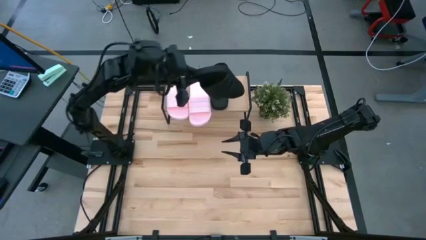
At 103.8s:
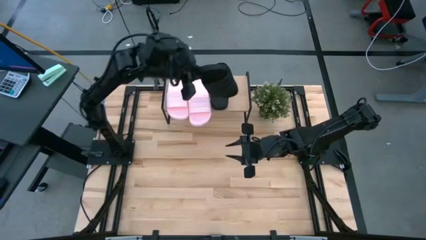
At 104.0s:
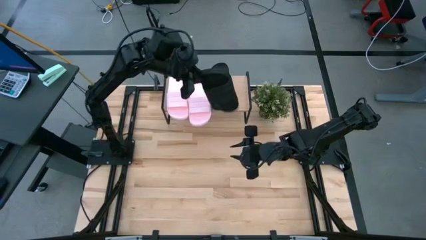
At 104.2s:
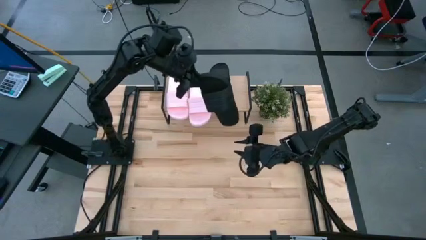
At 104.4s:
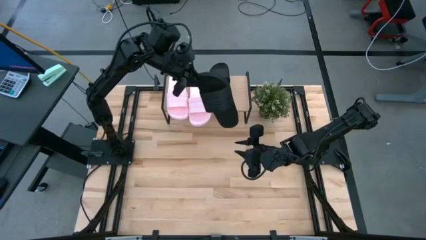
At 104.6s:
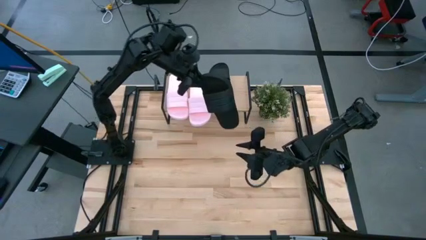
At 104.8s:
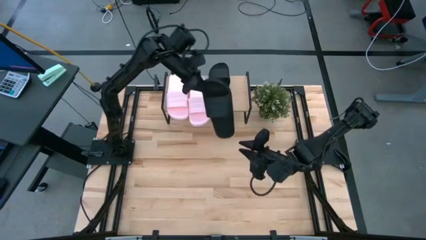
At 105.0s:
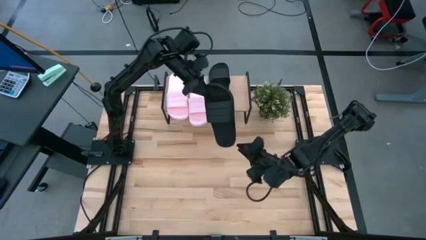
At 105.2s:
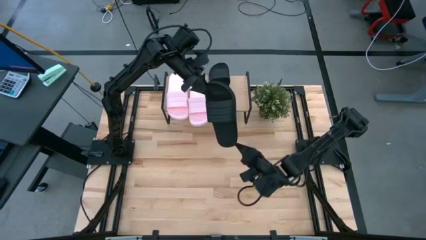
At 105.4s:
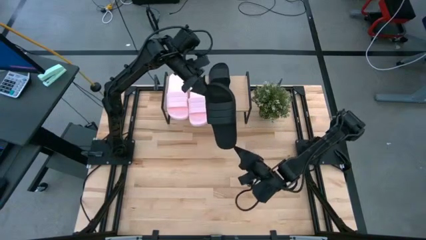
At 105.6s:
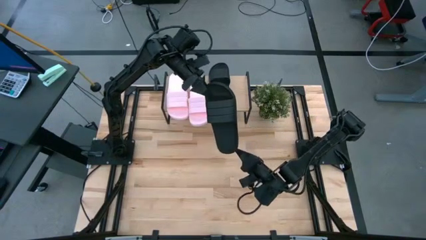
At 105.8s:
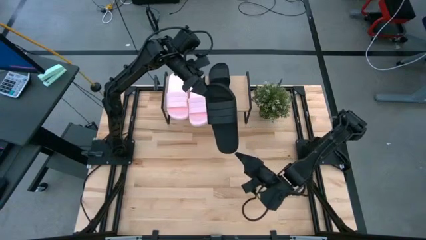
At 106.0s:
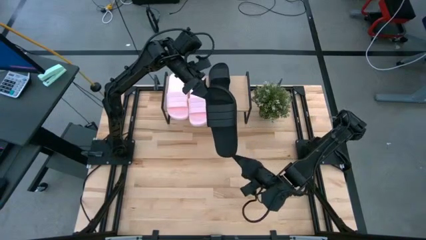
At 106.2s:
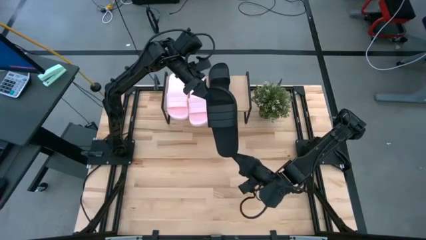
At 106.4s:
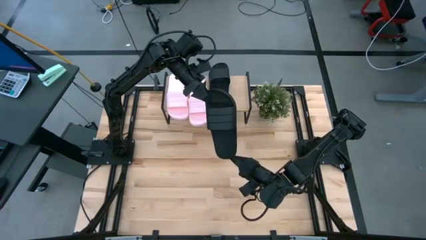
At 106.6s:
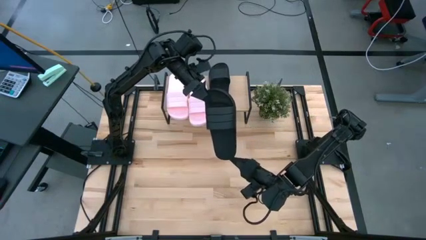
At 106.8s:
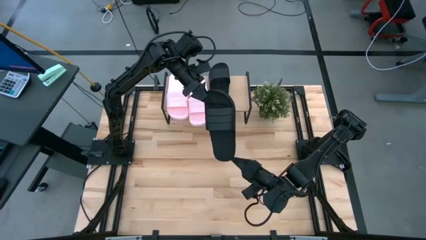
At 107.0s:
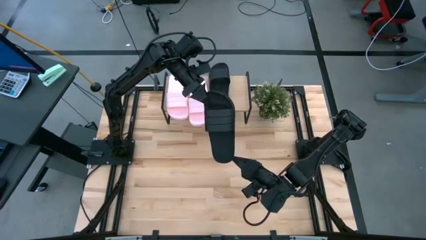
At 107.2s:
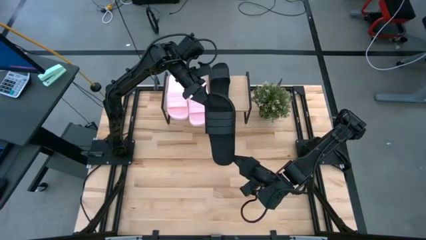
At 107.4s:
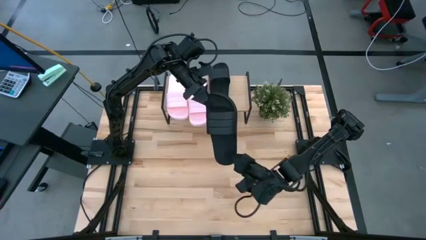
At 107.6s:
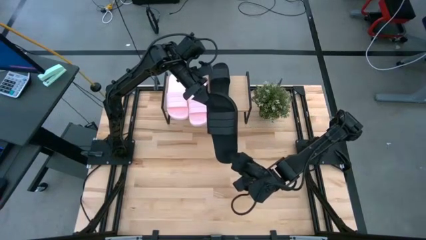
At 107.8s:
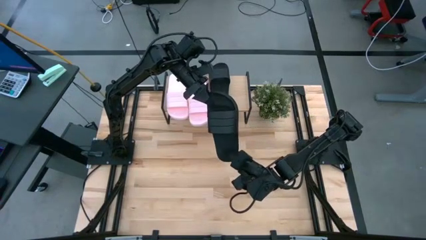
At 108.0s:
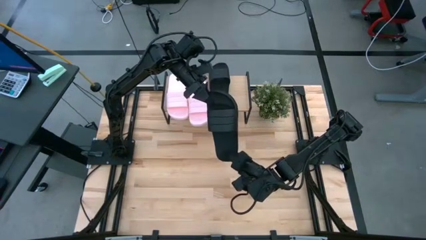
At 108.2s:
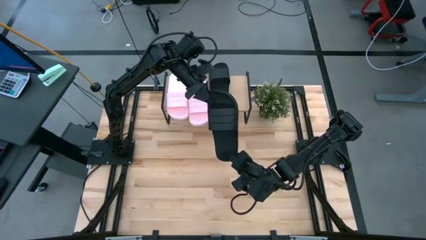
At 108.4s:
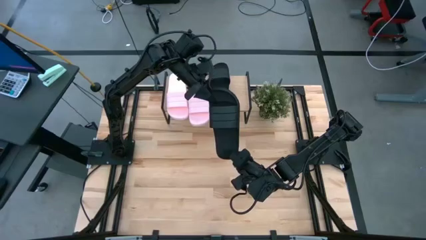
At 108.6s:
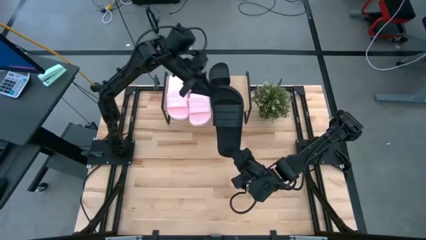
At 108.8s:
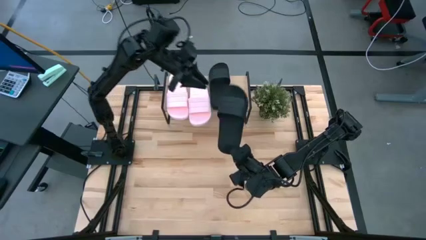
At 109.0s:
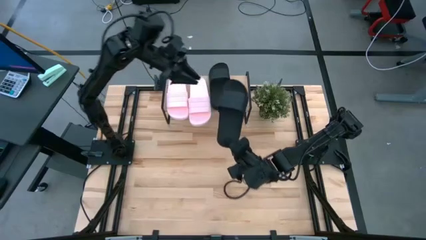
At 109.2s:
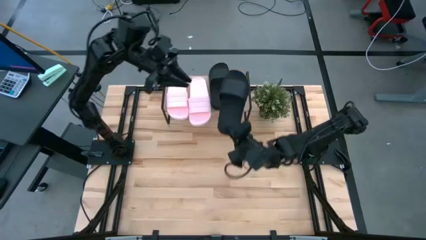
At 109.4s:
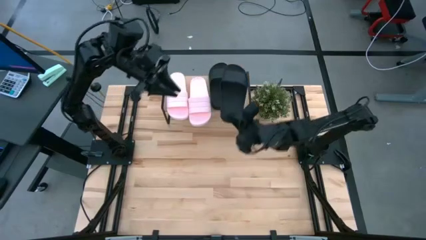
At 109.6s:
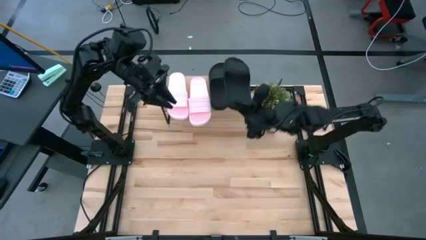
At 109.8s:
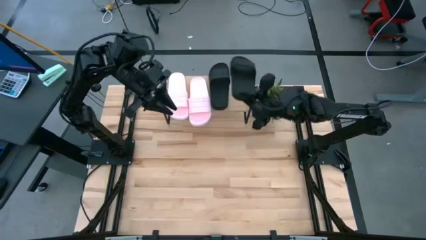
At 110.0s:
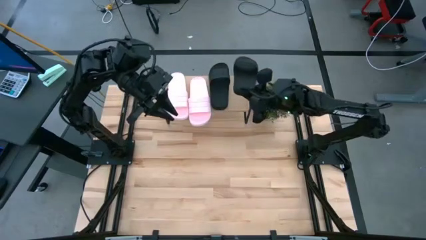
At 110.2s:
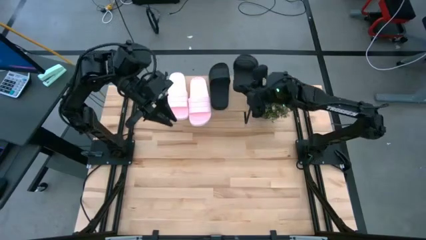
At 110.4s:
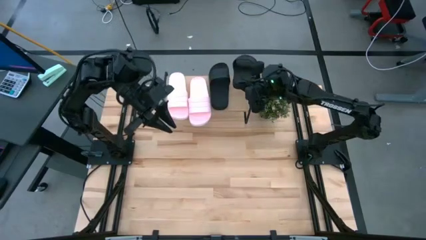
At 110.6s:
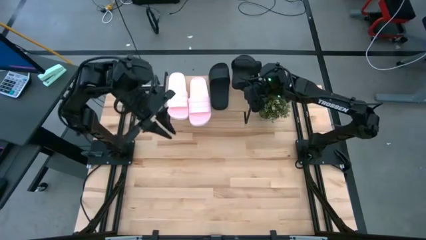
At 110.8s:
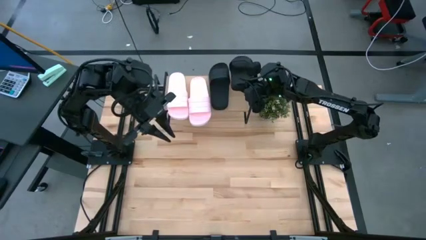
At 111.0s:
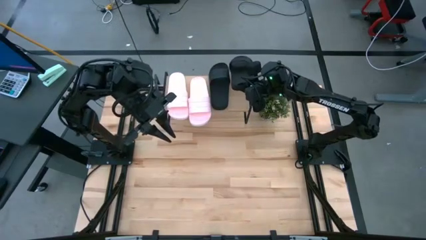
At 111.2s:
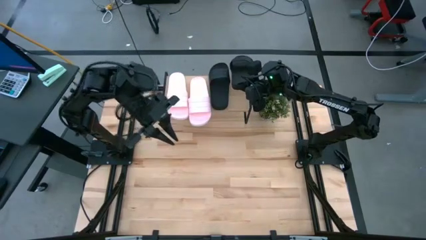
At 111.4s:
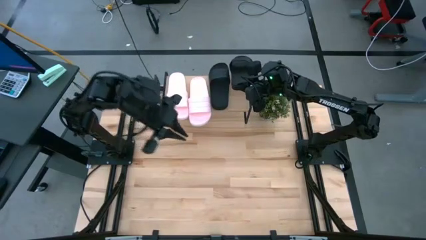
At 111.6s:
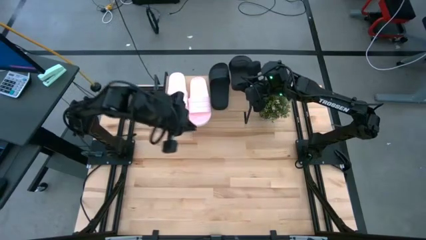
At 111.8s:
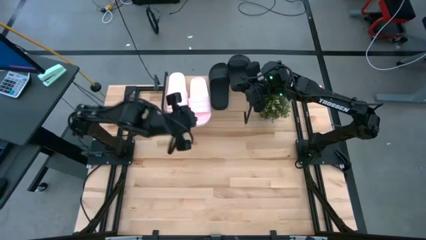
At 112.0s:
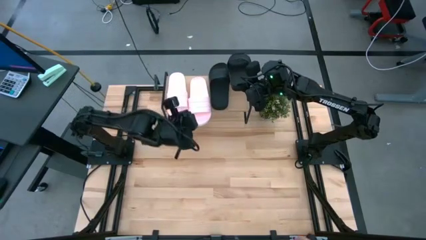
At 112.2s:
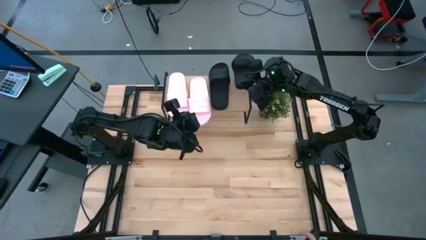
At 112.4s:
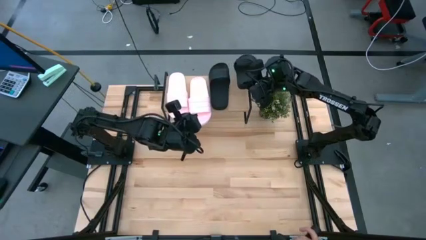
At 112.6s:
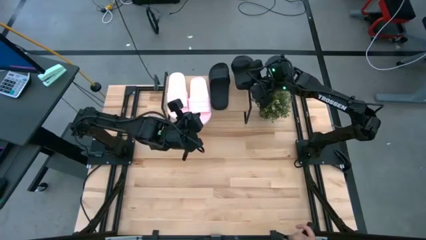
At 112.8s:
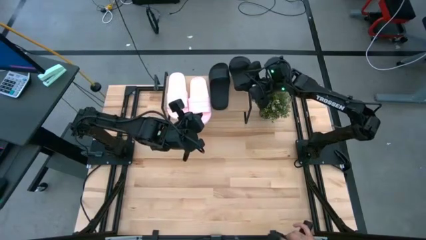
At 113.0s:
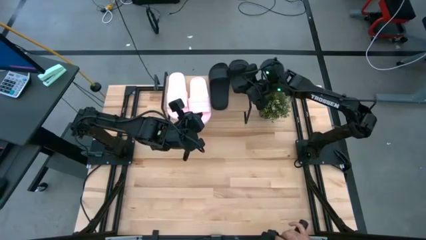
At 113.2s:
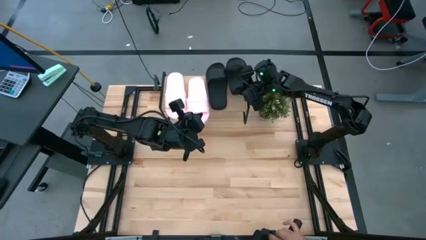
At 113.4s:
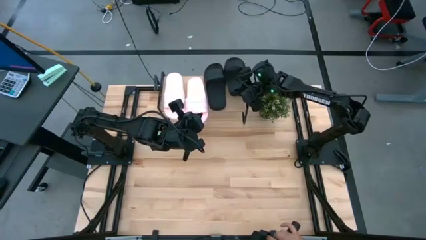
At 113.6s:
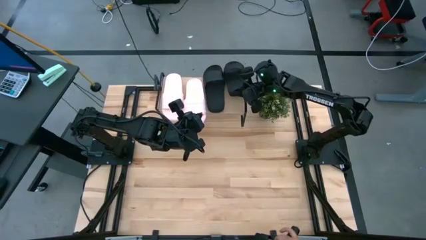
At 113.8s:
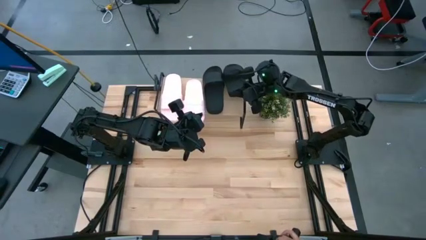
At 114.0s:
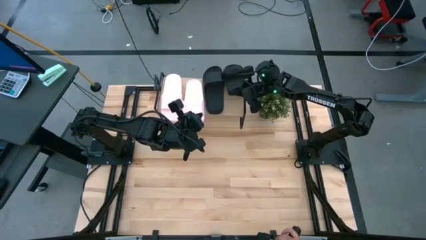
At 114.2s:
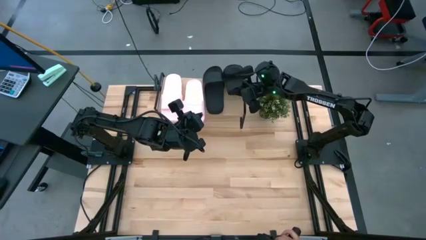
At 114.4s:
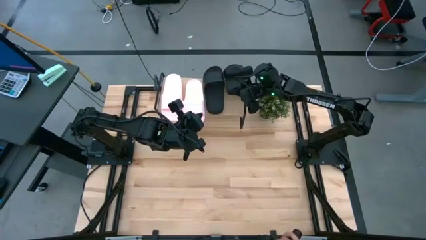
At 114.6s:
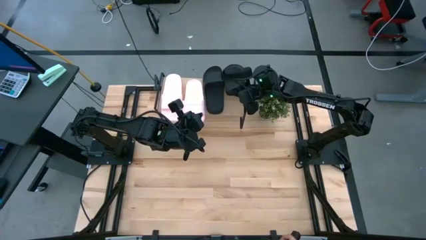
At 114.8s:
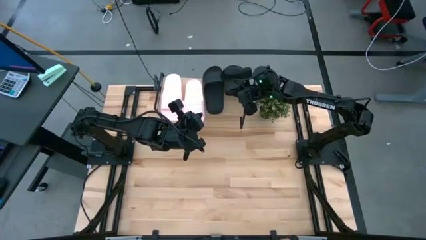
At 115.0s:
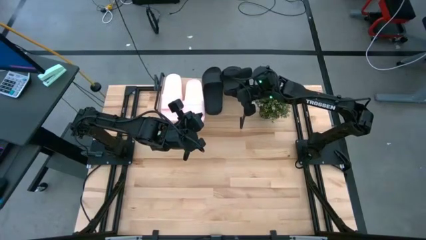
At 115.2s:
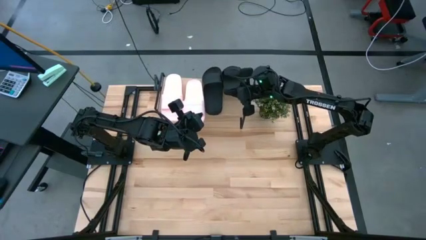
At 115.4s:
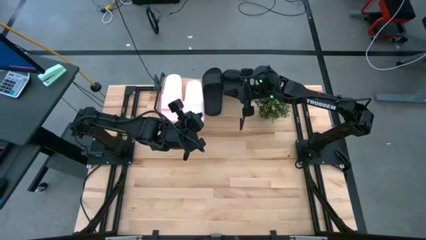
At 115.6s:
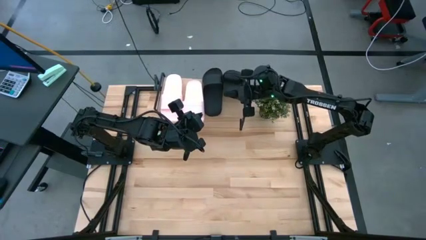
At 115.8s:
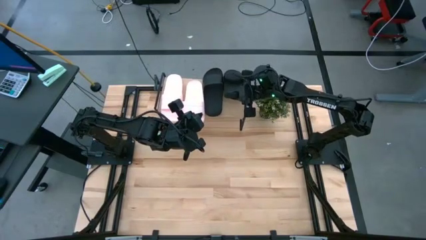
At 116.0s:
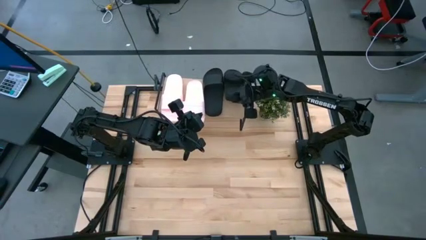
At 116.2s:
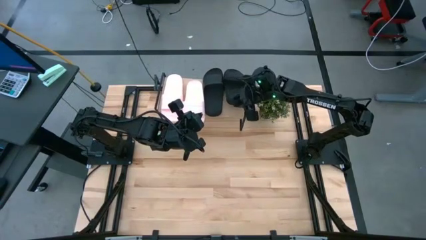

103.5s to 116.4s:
Task: Pick and place slides into the shelf
Put the black slide on the shelf

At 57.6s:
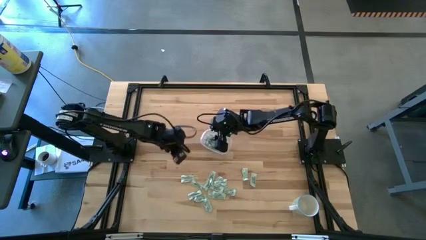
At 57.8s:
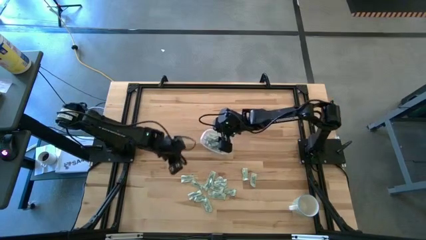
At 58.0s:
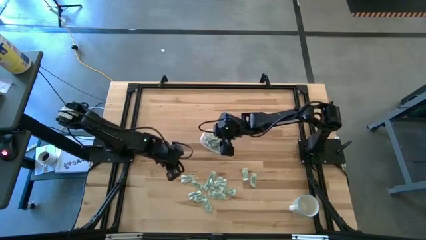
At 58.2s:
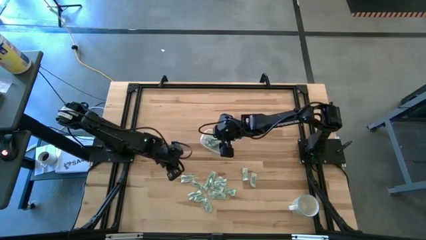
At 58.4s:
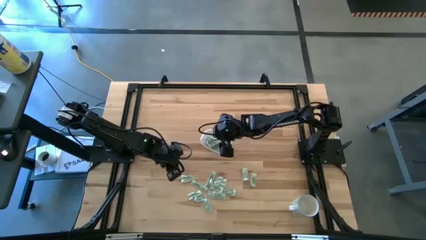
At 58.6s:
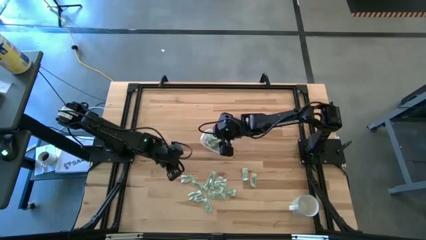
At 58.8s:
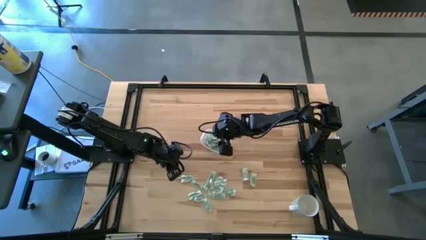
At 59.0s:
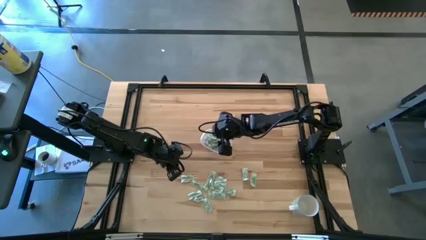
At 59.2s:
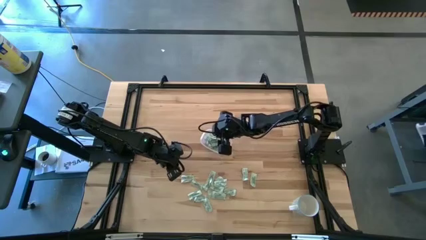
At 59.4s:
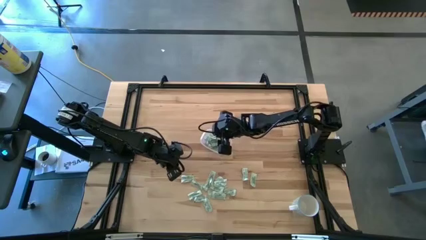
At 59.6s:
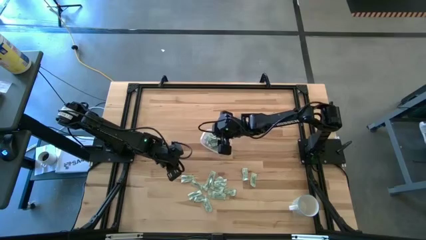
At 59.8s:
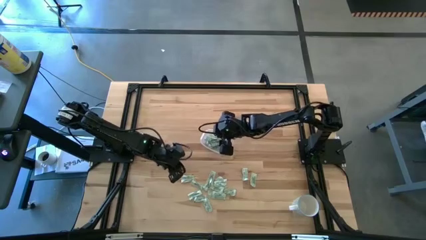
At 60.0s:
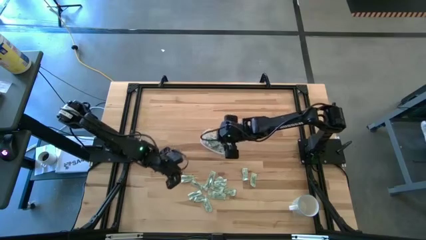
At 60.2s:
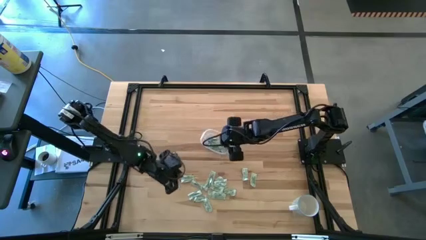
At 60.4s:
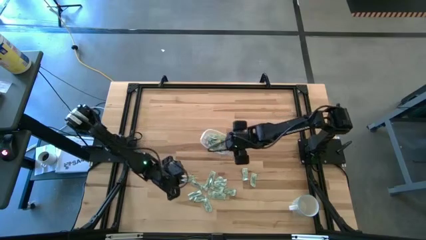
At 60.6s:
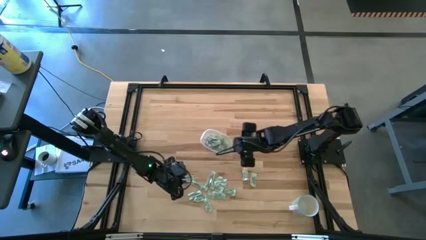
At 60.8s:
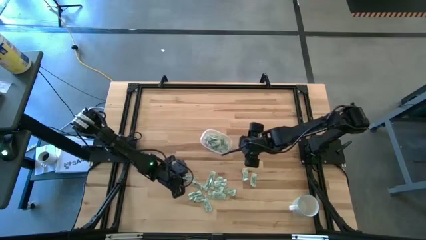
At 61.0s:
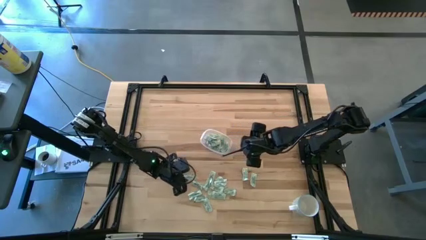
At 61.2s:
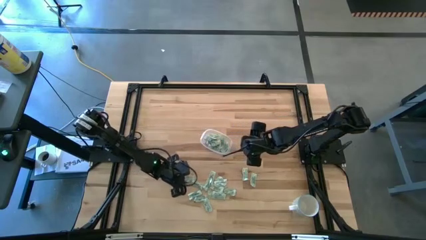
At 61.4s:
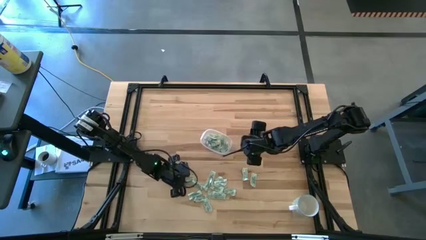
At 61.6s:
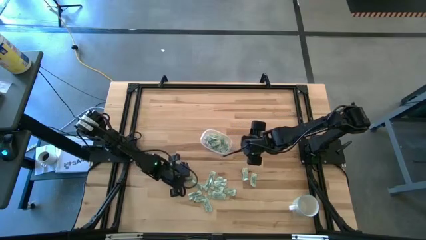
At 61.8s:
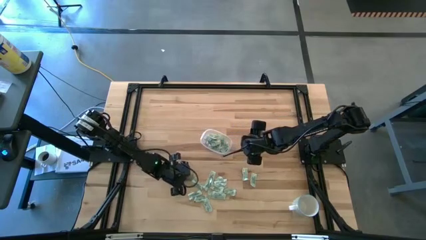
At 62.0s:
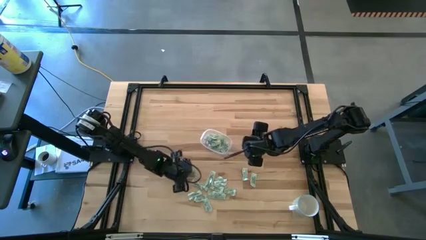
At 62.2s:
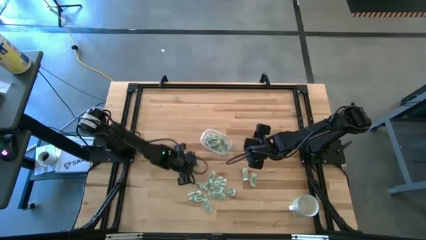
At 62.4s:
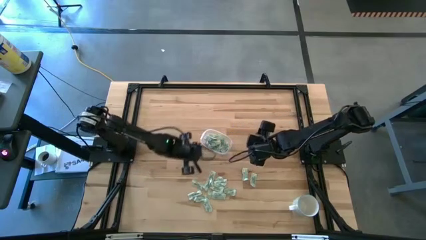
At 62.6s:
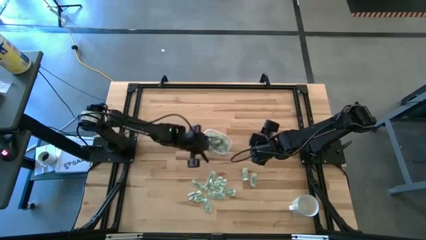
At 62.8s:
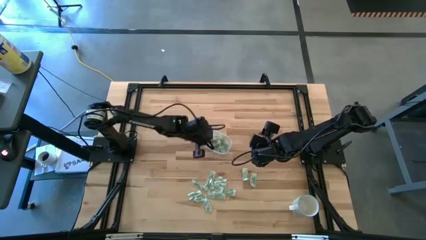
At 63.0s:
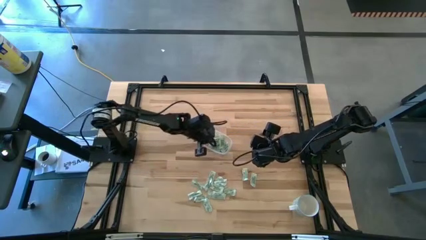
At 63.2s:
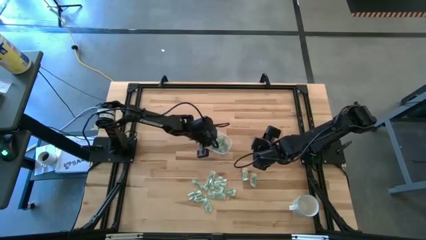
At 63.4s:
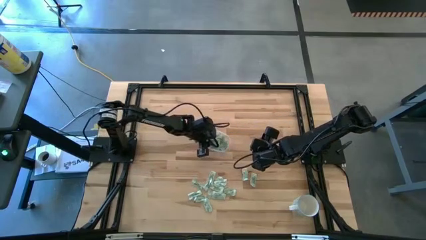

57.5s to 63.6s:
Task: Pick and place Stevia / Truvia into bins
Put the stevia packet into the transparent container
